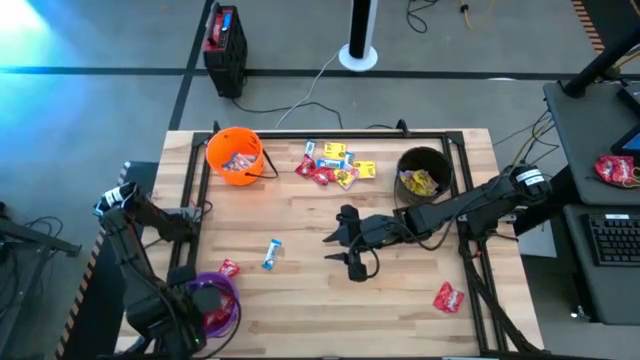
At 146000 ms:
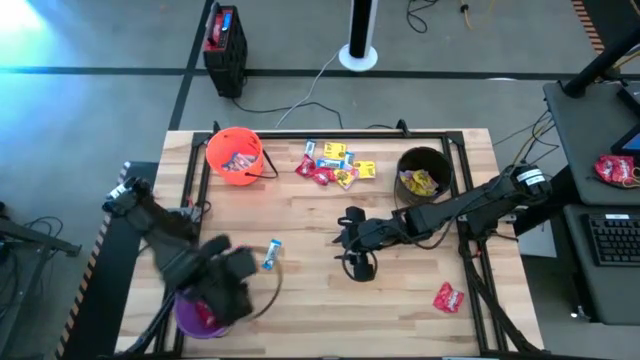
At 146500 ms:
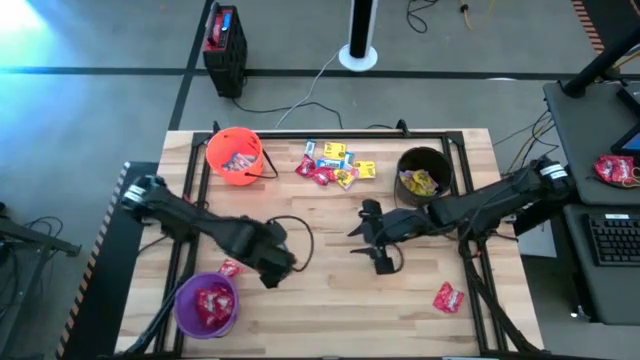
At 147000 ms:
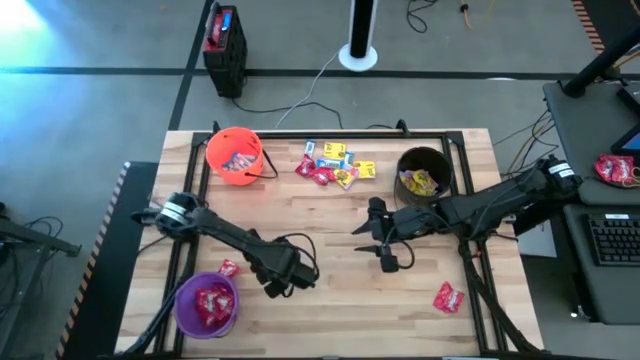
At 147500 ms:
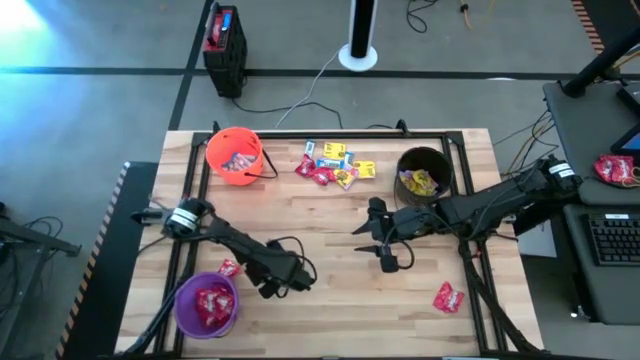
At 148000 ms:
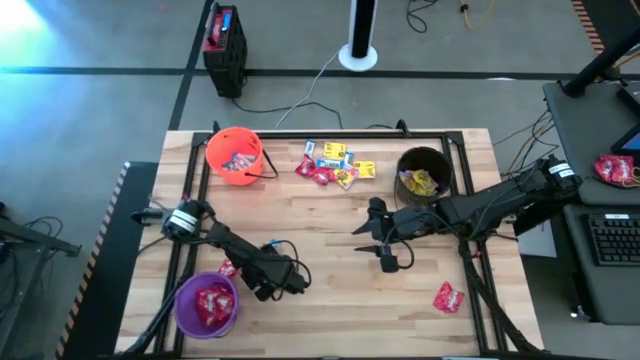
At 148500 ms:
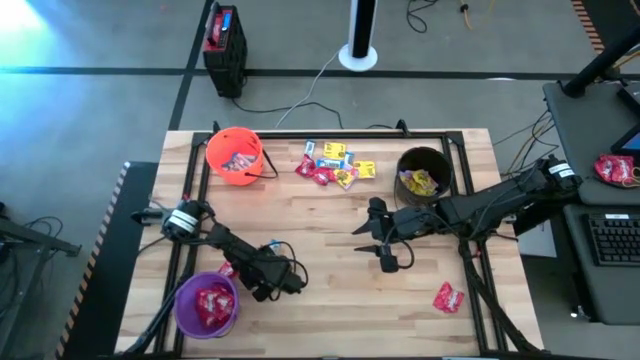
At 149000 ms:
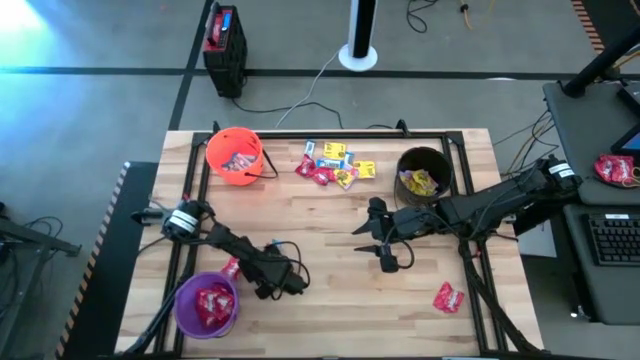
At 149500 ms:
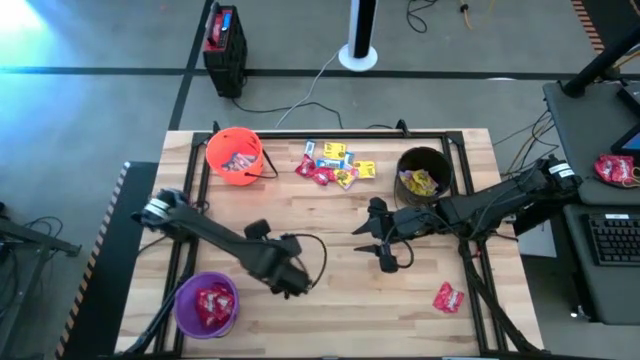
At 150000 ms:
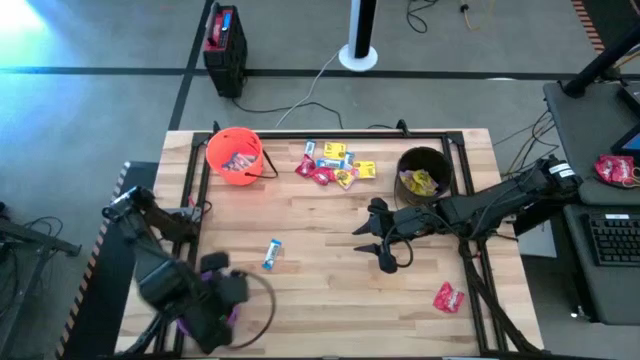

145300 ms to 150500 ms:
Task: Sort candy by brand, put in halloween buckets
Put the red candy into the purple bucket

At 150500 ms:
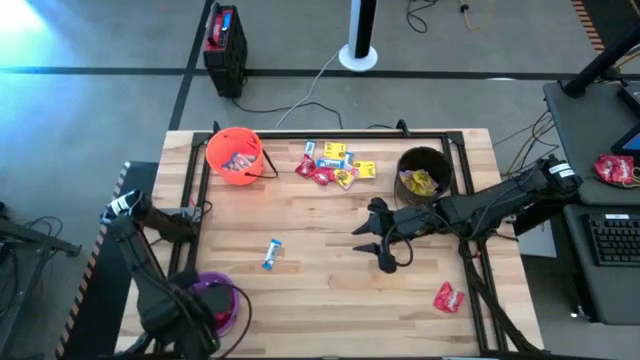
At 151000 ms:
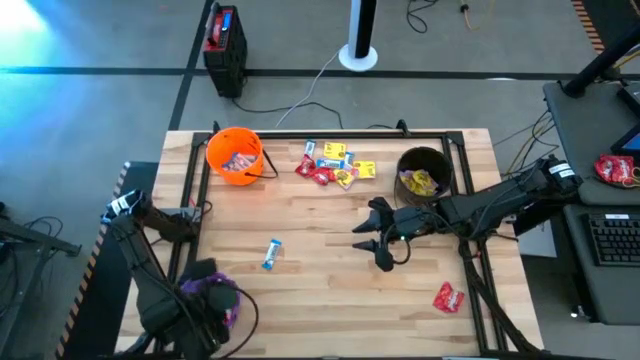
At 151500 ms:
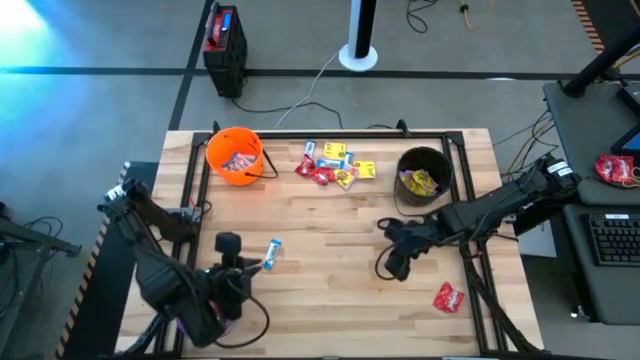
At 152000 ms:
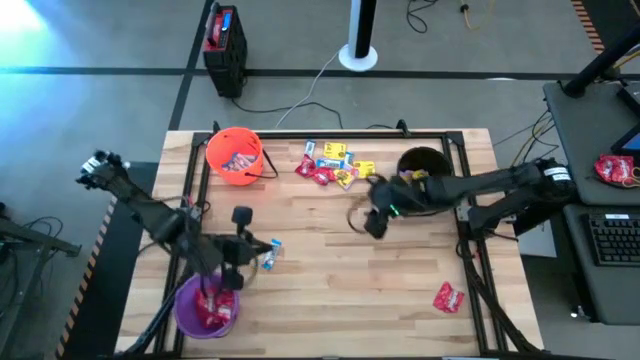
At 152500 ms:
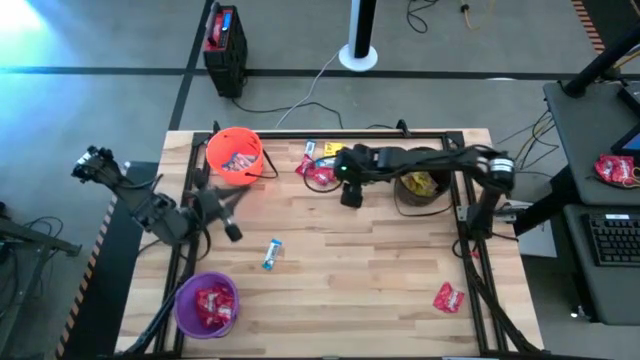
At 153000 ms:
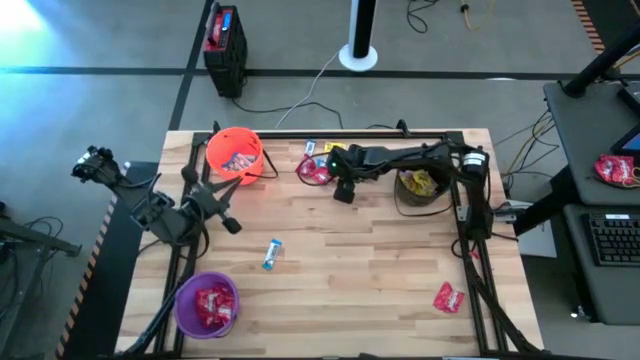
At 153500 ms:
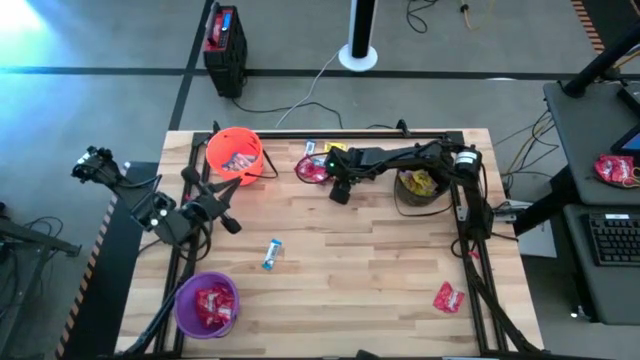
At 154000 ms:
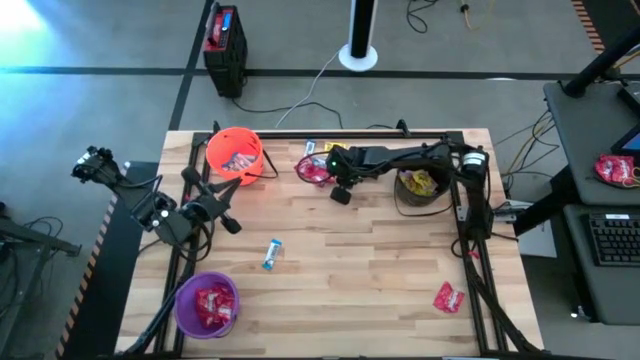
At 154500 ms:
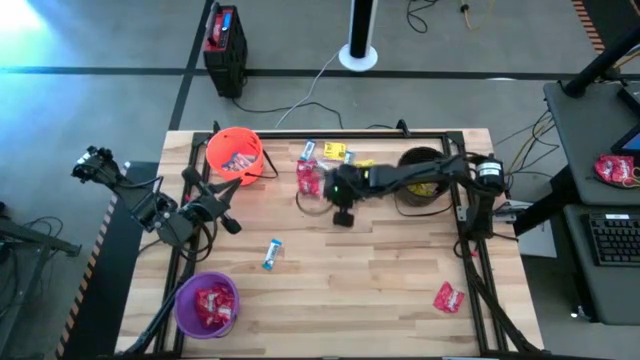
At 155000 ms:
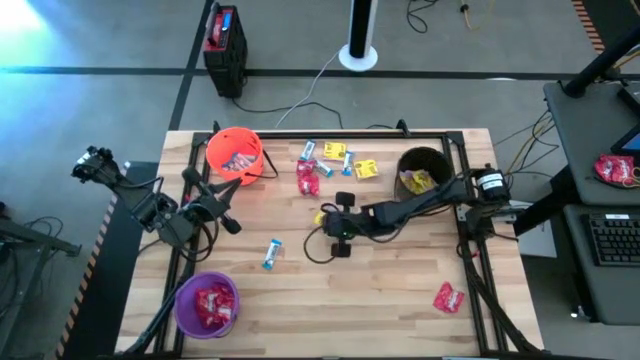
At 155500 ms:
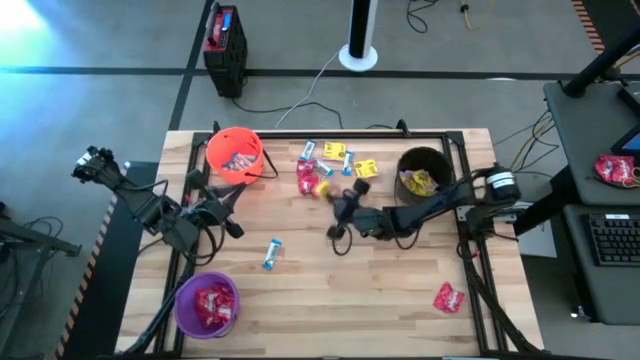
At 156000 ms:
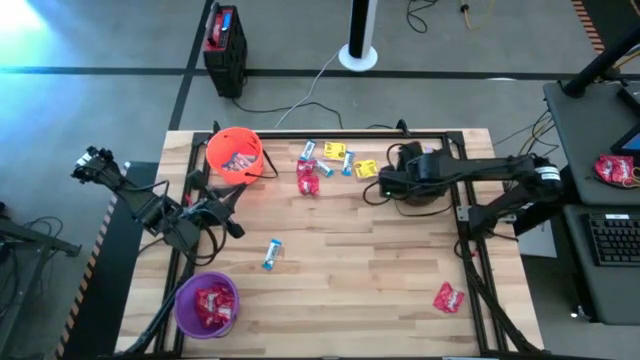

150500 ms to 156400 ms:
Put the yellow candy into the black bucket

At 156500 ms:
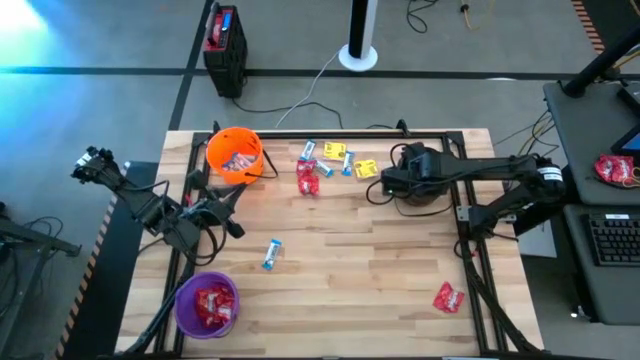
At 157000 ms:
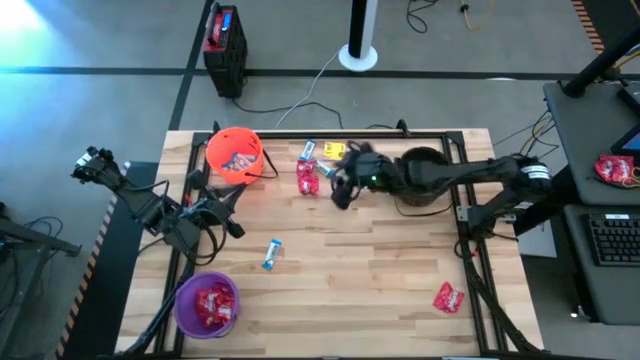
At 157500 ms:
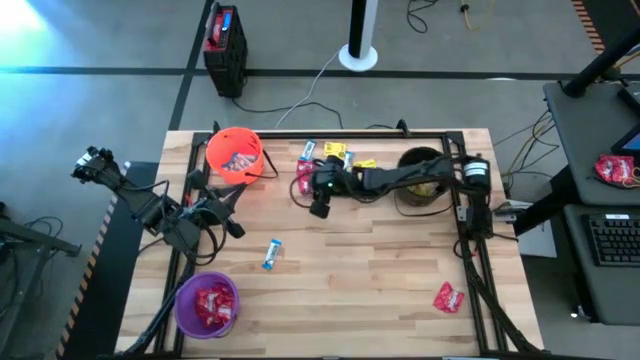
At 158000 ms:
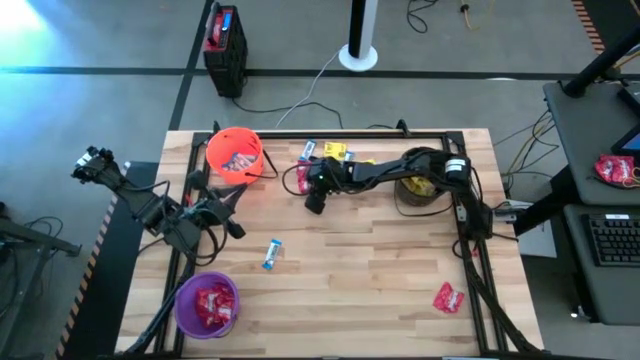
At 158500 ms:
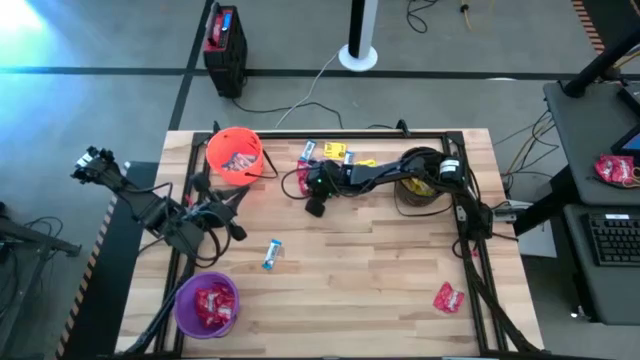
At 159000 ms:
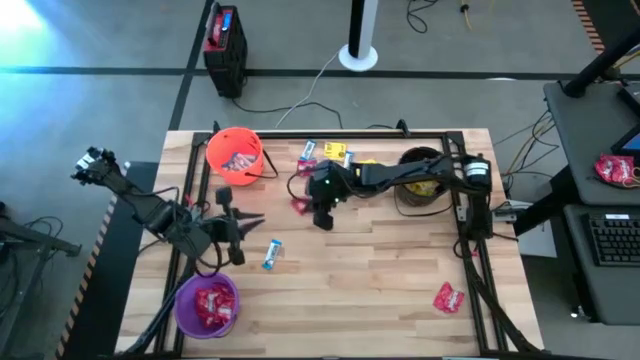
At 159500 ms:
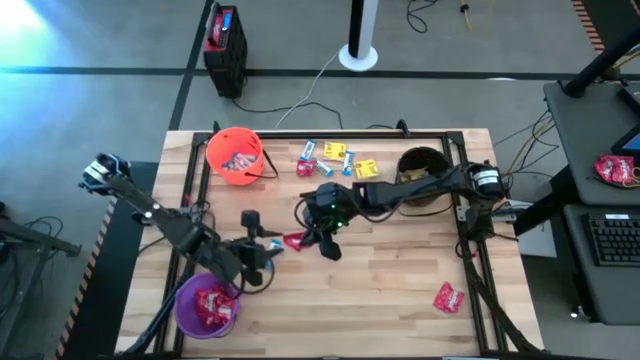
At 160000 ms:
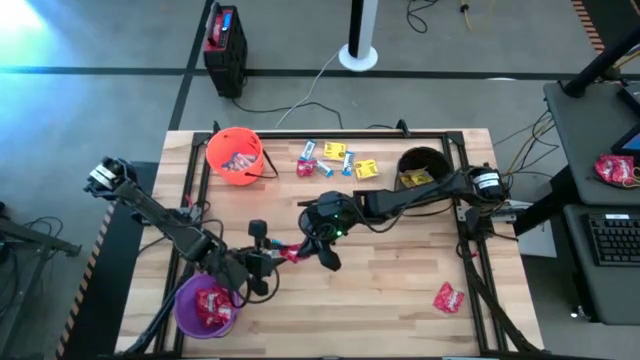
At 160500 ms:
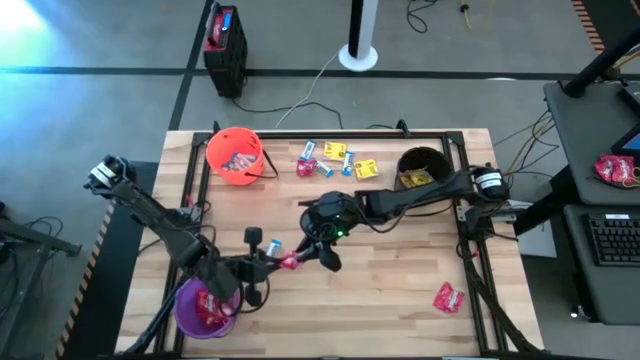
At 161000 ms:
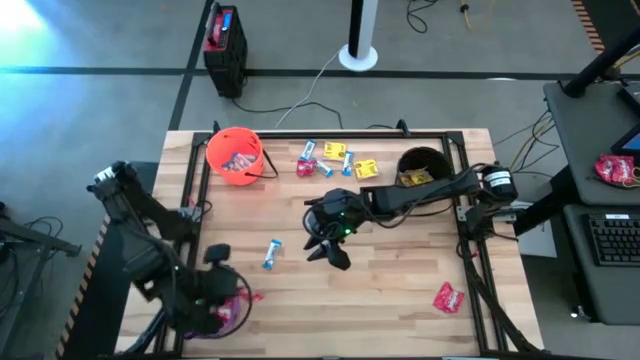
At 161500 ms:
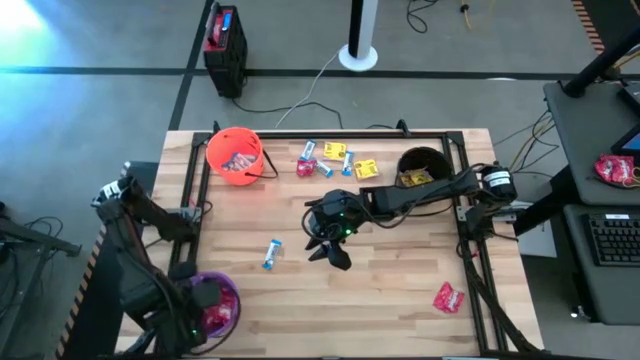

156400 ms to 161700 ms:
Put the red candy into the purple bucket

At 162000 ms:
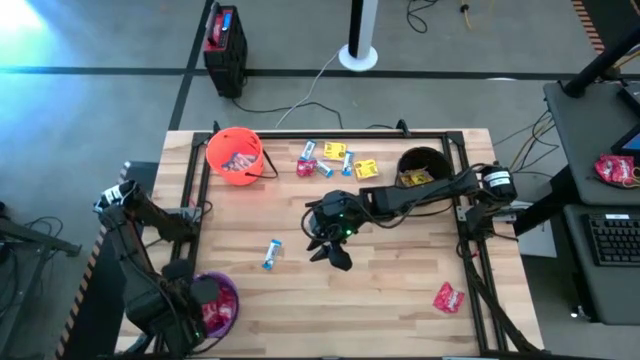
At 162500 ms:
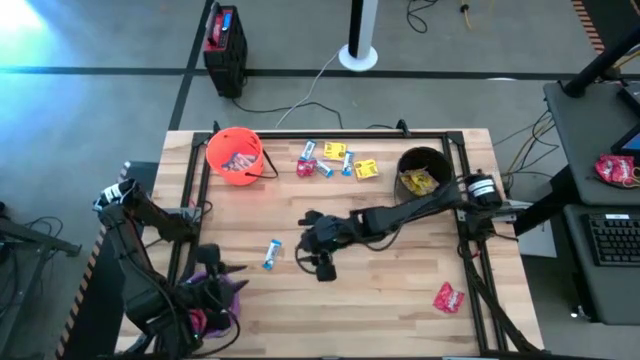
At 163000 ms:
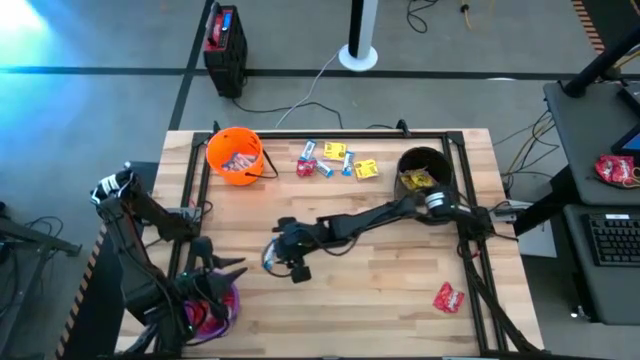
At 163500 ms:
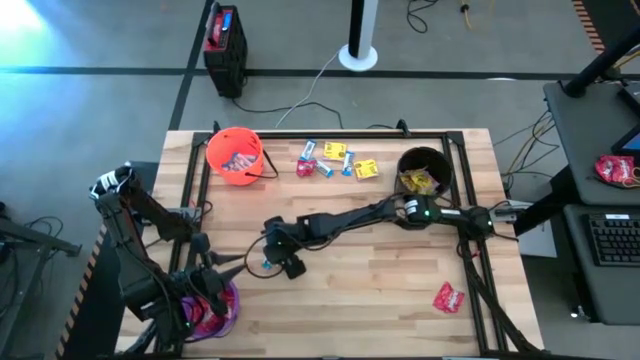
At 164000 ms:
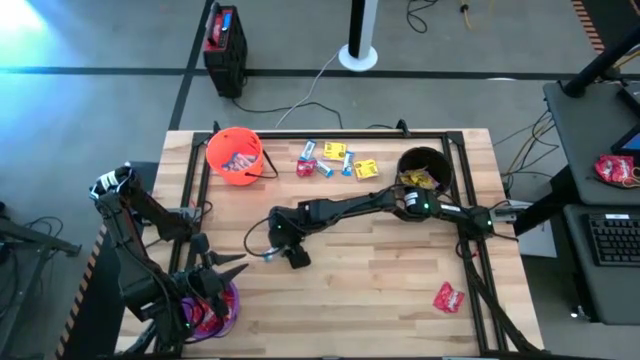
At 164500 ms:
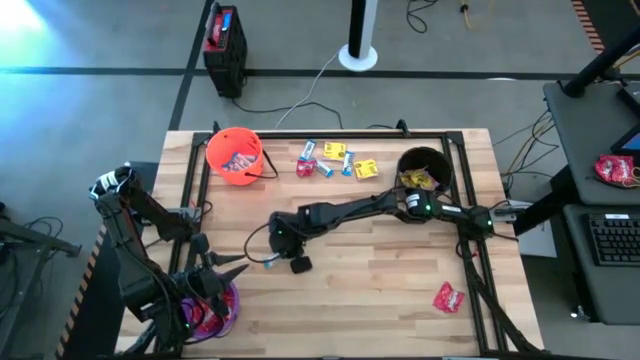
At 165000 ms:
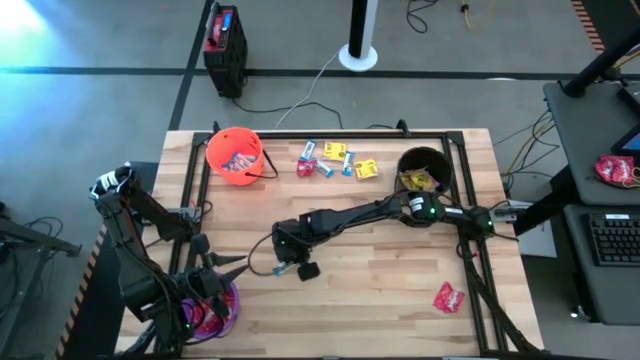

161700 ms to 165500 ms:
Put the white chocolate bar into the orange bucket

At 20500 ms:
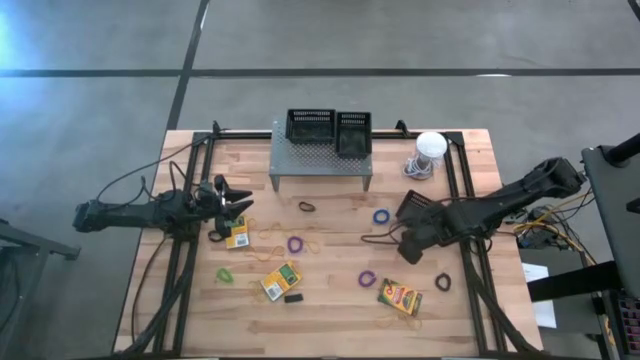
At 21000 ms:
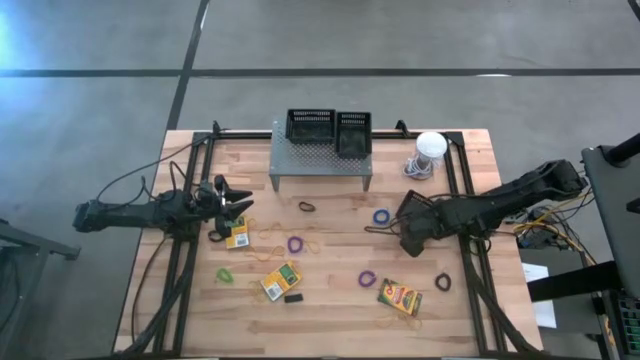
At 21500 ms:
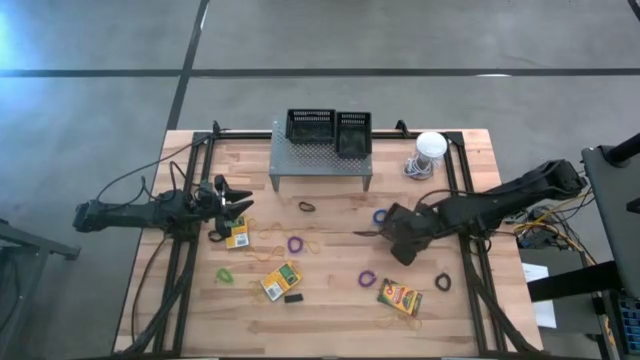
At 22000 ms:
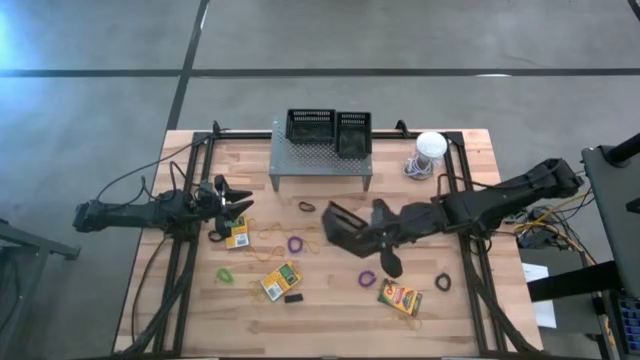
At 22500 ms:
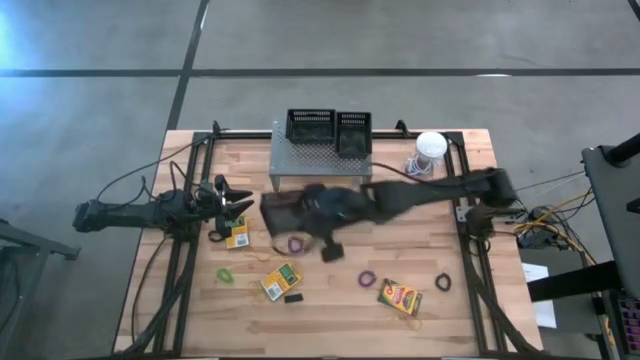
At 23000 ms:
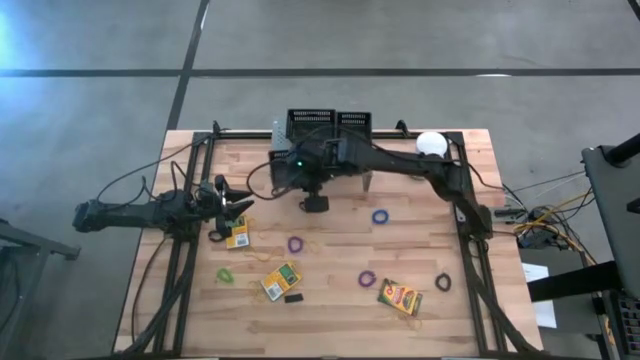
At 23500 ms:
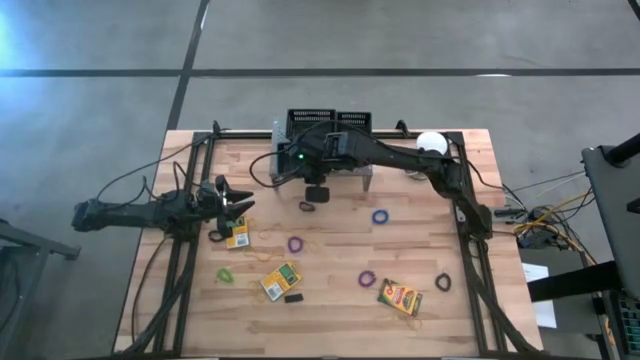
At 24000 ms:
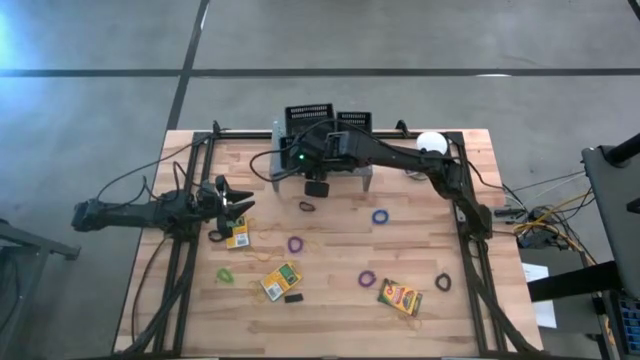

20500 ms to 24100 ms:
Task: Pick & Place Office Desk Supplies
Put the black bin on the shelf
